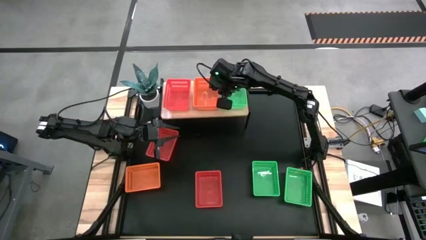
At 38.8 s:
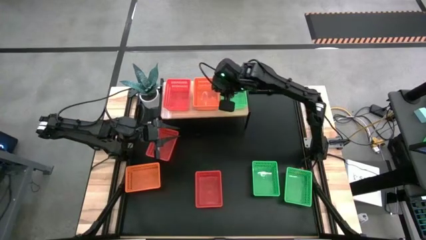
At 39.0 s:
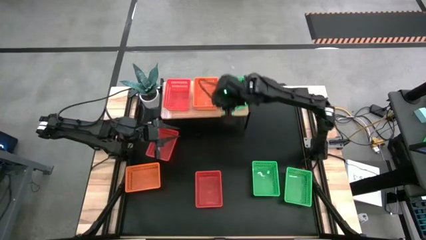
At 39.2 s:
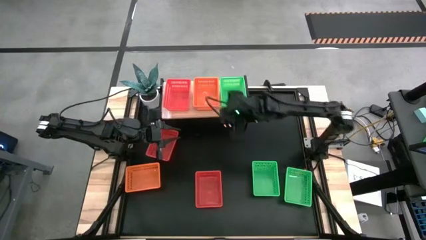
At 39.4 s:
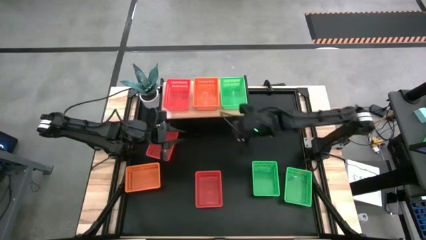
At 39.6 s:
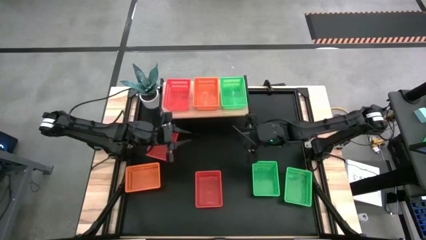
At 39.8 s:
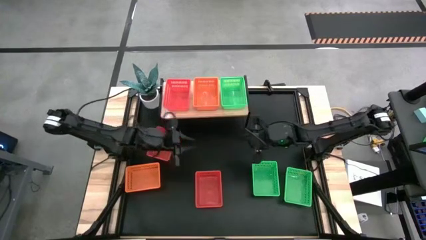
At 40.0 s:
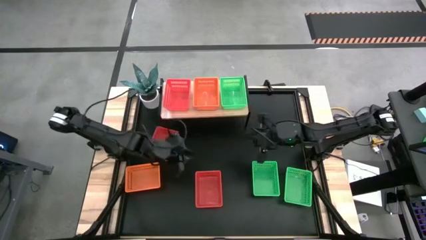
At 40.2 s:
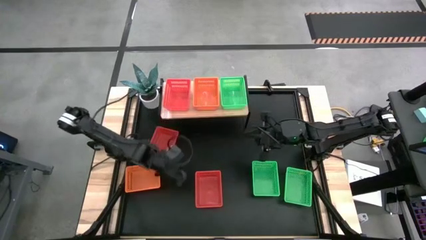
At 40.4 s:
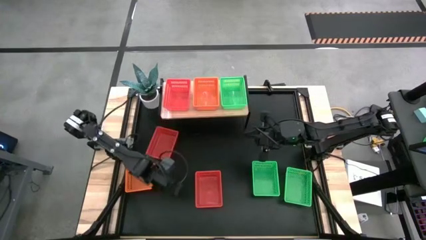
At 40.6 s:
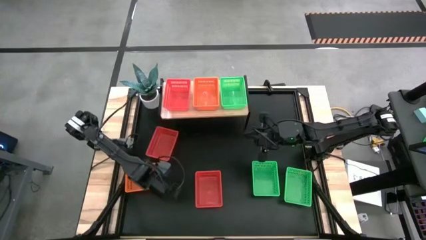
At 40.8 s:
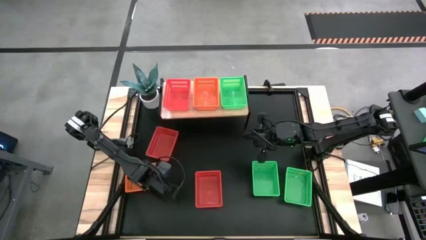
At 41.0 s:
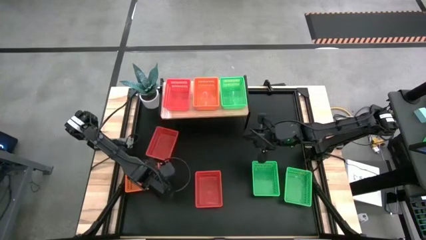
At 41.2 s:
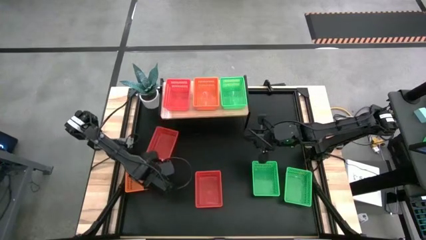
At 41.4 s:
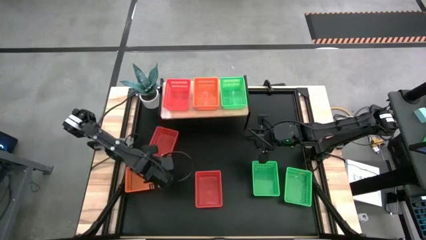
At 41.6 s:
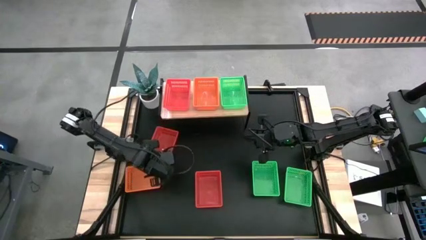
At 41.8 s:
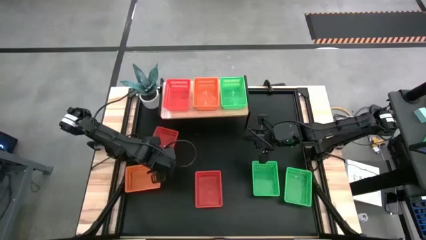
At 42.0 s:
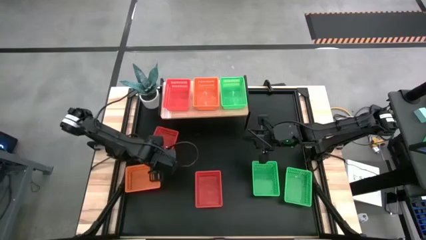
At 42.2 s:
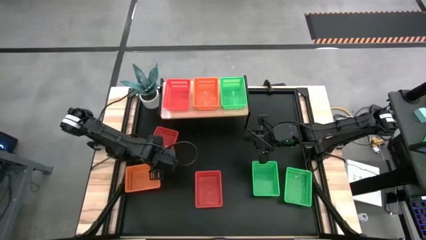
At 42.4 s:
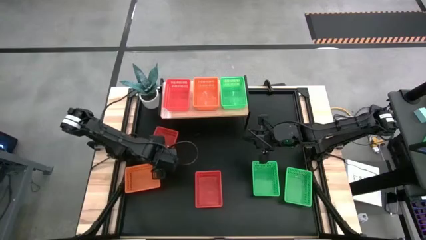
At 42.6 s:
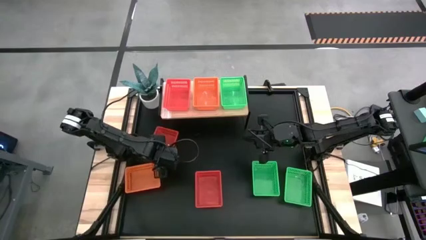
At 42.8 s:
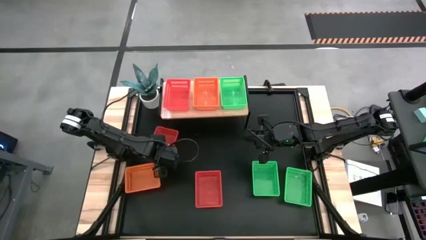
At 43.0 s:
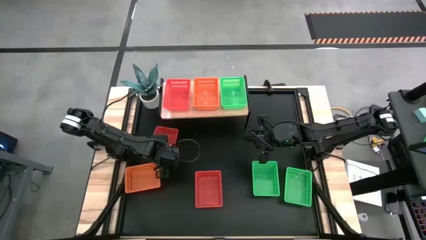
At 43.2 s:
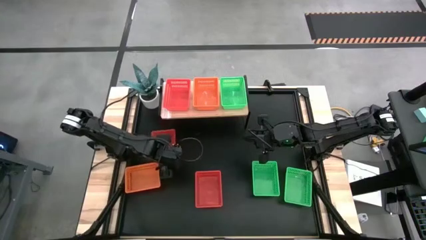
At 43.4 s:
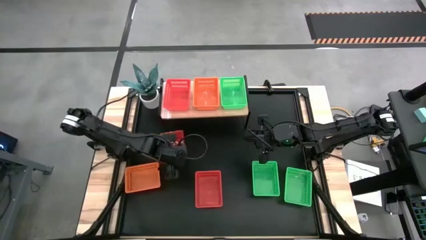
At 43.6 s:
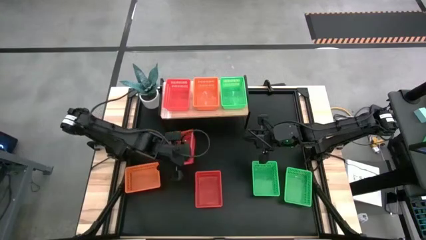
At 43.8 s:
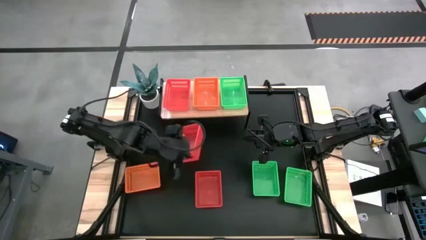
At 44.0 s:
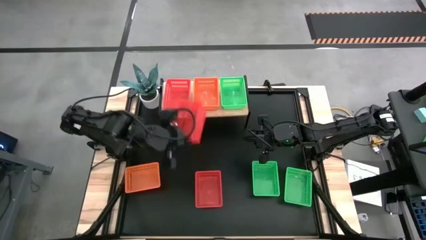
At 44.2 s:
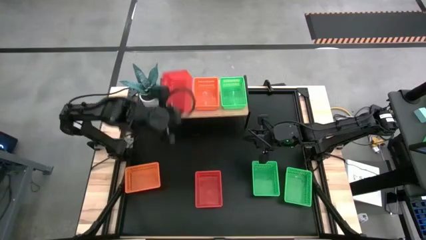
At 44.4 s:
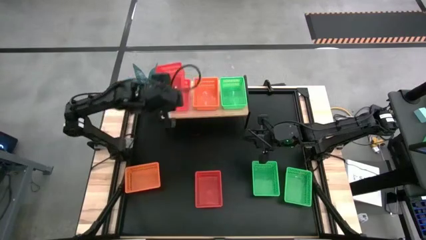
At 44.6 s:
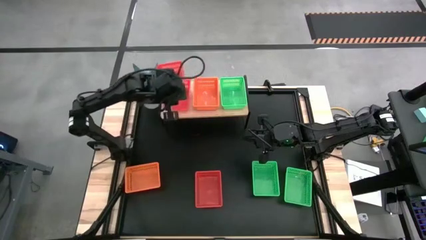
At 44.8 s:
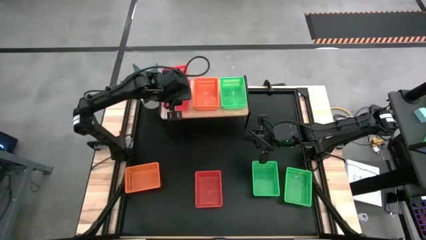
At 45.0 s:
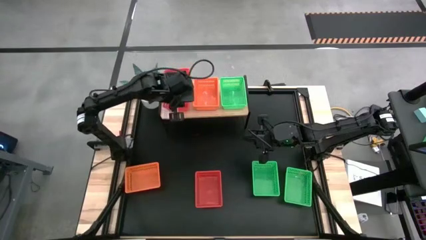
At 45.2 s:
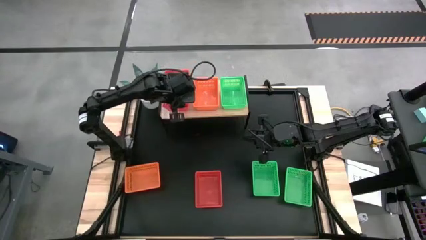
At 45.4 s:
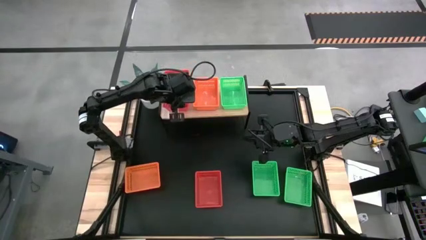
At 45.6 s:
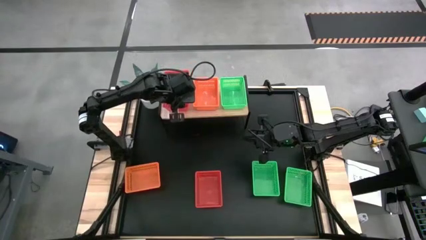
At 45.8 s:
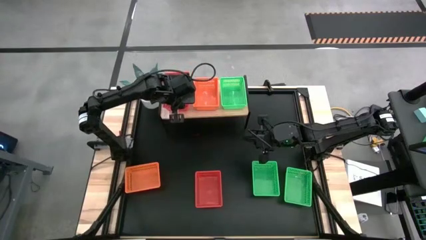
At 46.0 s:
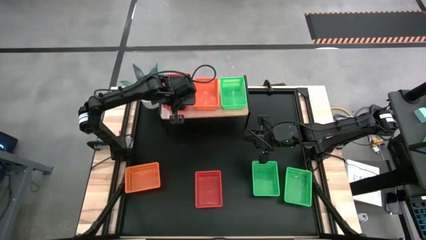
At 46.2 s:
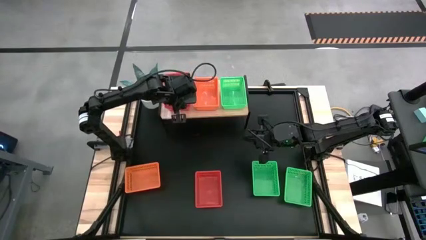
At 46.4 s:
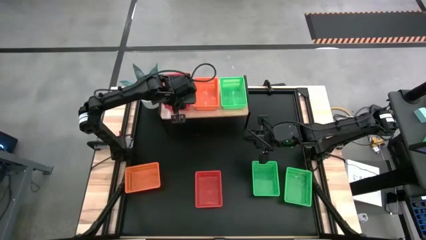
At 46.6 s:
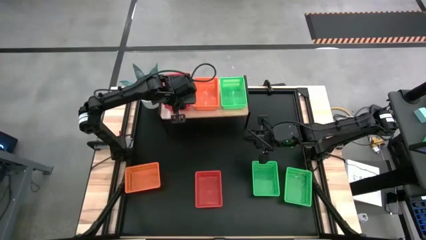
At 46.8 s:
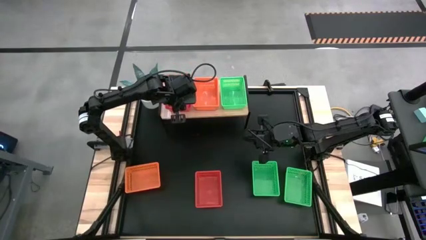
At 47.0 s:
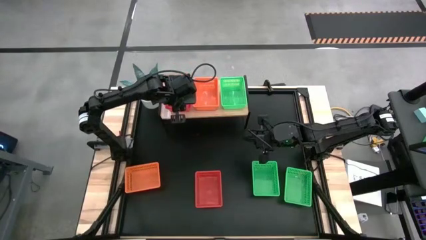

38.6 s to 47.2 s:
Stack the top red basket on top of the other red basket on the shelf

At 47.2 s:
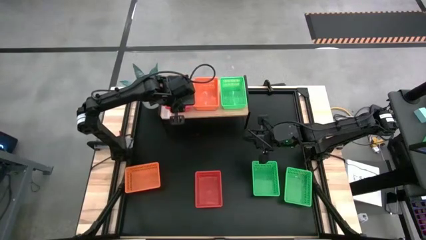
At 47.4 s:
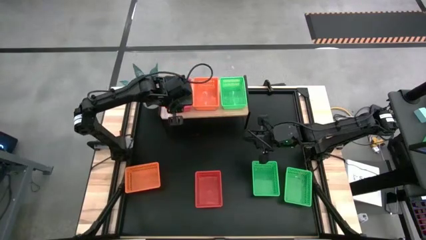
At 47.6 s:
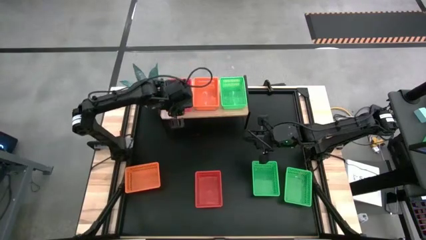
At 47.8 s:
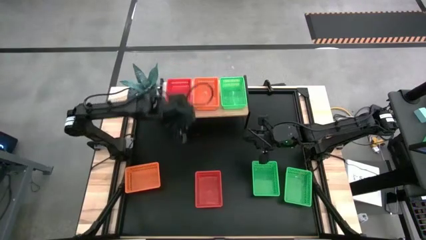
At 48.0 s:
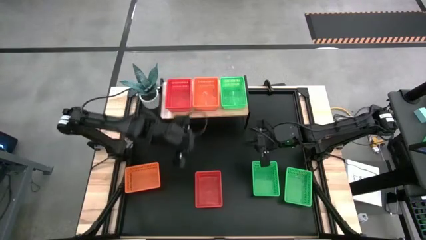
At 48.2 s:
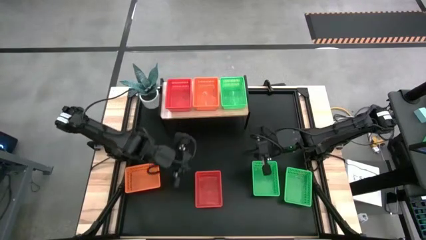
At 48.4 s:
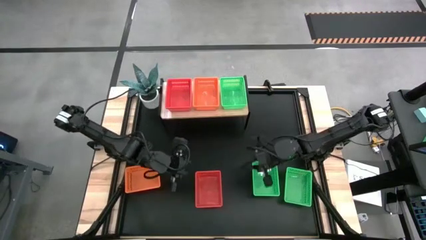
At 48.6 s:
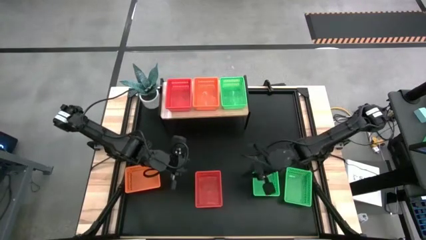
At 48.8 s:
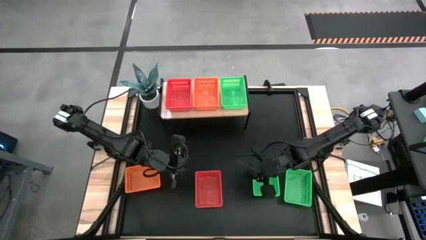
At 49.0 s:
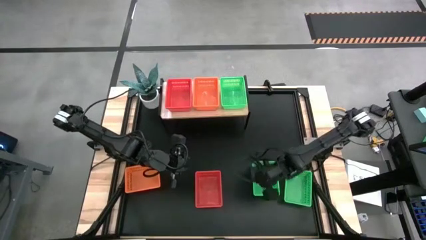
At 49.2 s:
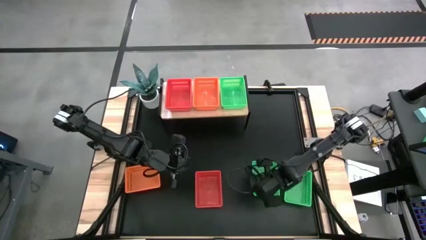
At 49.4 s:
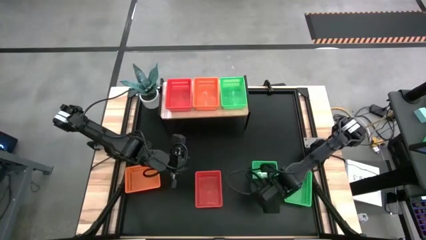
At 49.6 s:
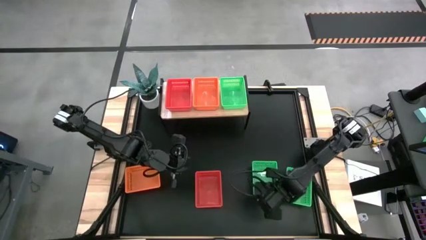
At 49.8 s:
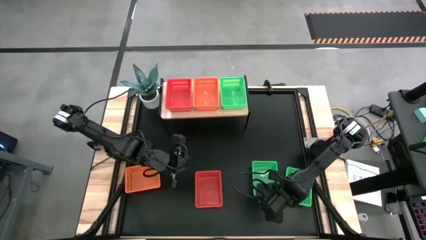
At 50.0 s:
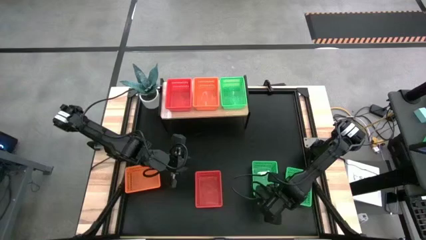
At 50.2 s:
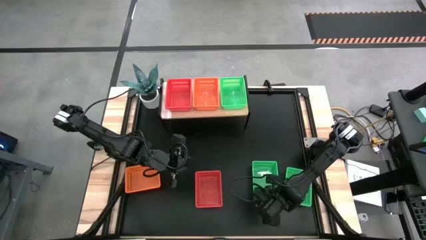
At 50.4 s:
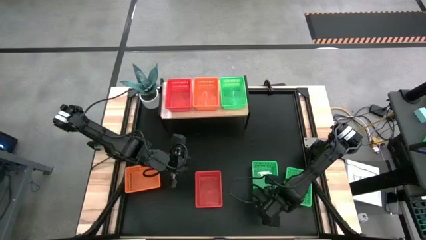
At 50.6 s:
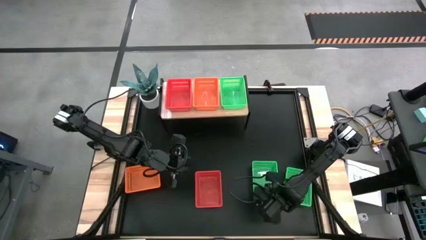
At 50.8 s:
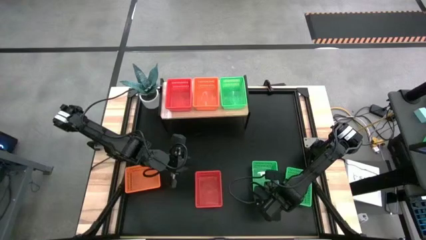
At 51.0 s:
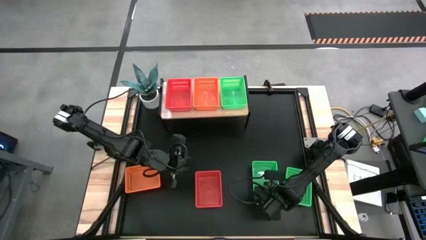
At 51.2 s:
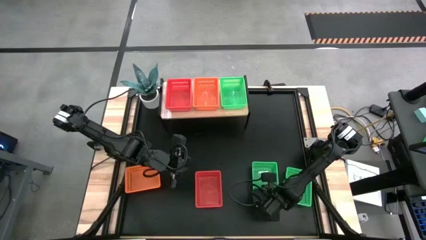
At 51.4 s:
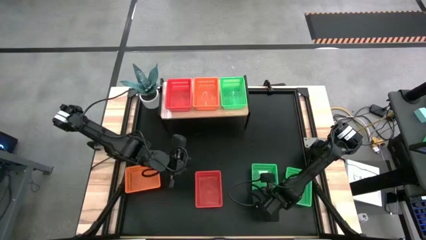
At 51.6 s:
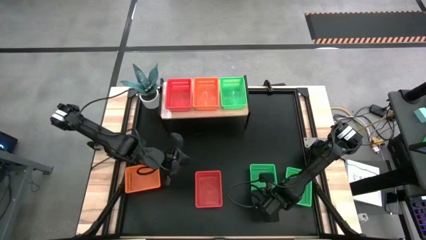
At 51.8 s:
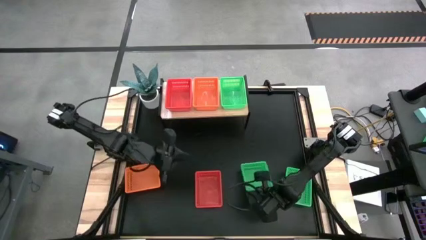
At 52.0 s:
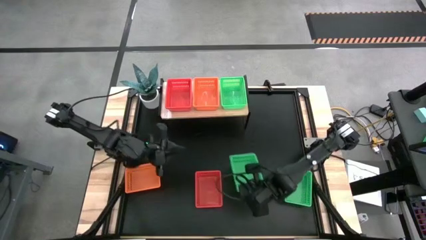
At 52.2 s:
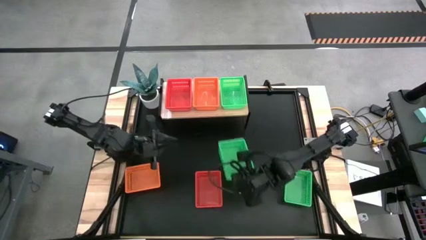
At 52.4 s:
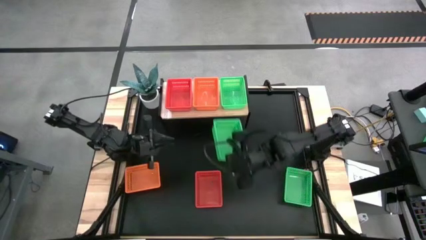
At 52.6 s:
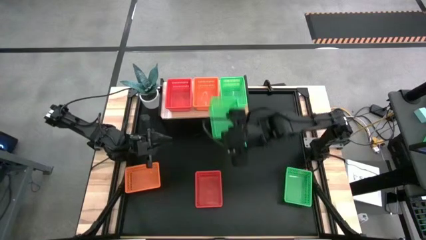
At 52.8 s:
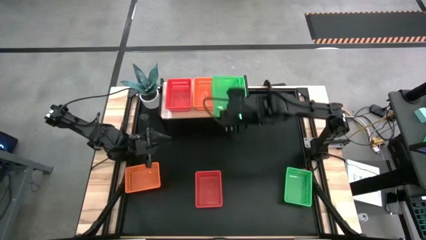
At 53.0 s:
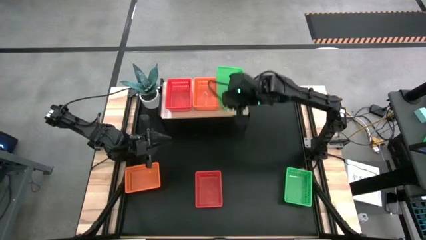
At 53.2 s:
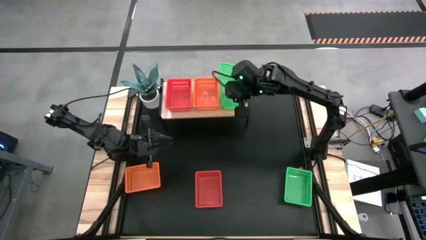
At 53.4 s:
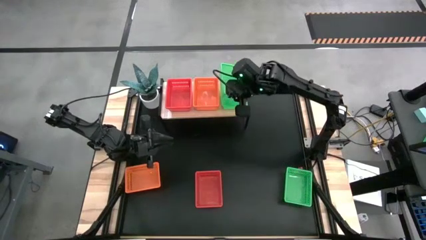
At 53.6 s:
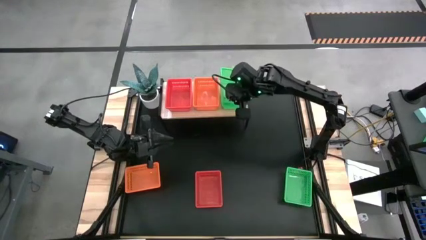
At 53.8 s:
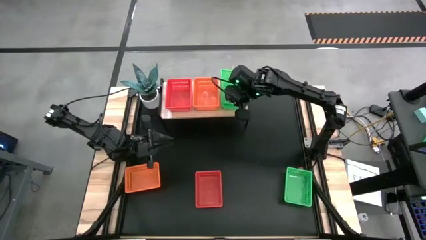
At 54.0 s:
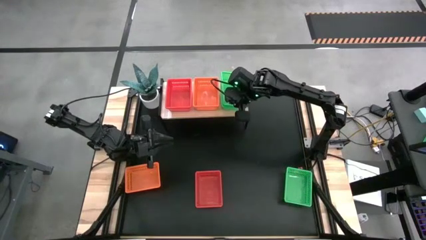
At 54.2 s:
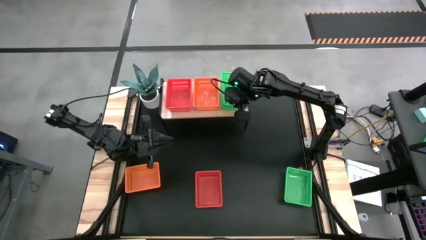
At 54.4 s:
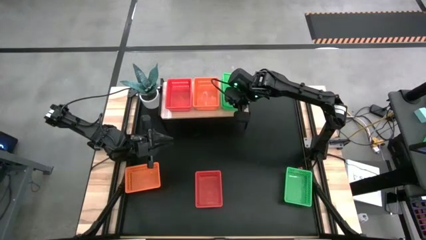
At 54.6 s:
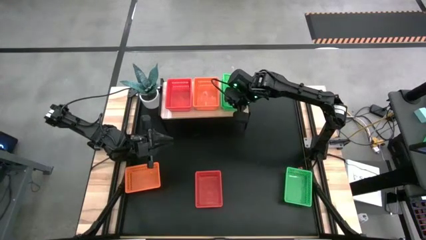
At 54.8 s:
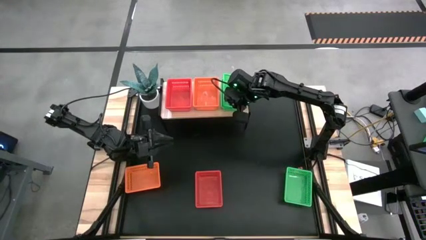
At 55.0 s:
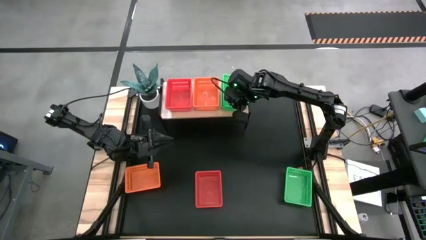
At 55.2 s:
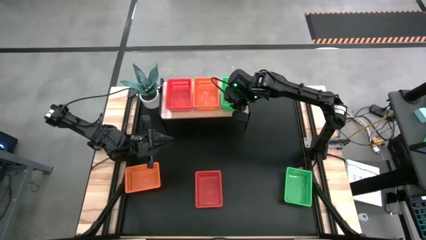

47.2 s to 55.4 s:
Stack the left green basket on top of the other green basket on the shelf
